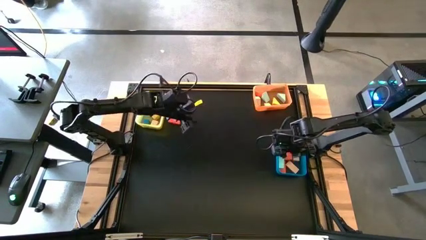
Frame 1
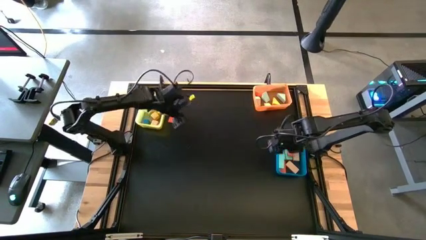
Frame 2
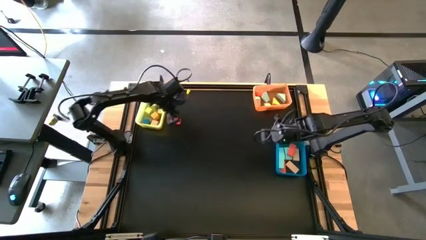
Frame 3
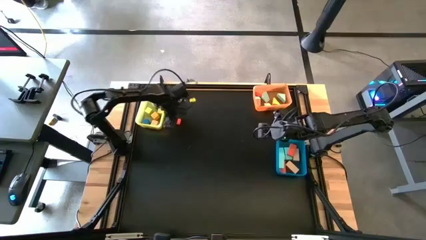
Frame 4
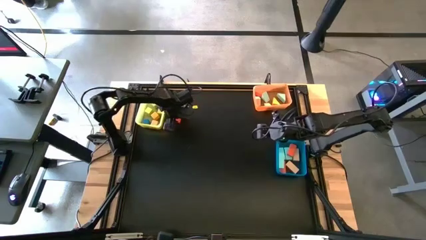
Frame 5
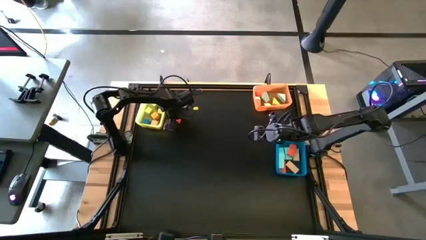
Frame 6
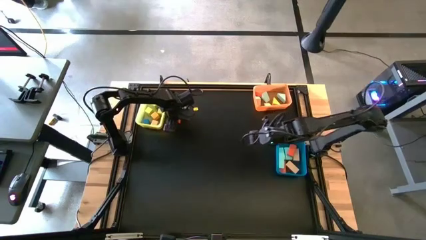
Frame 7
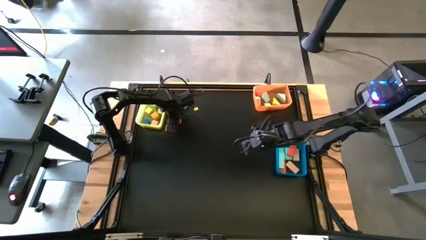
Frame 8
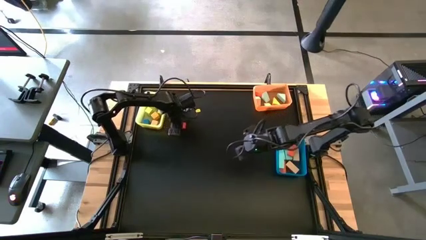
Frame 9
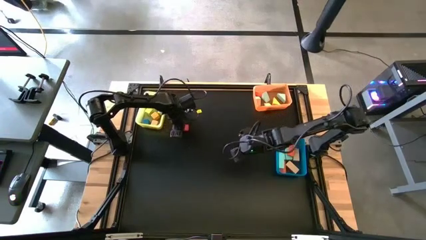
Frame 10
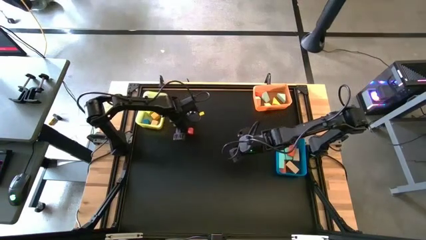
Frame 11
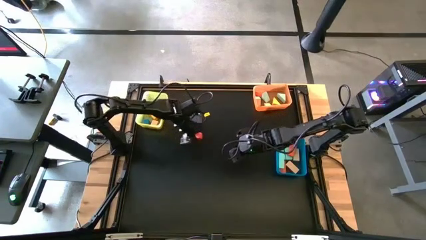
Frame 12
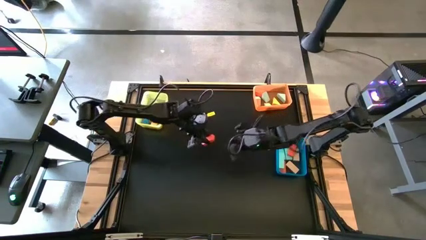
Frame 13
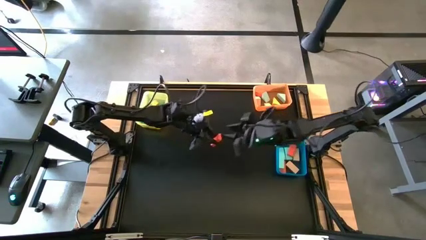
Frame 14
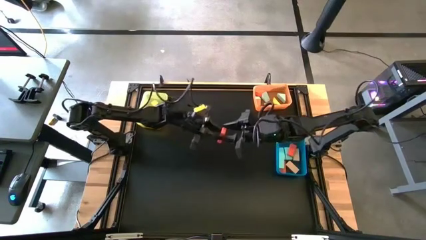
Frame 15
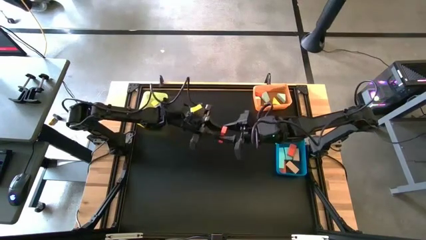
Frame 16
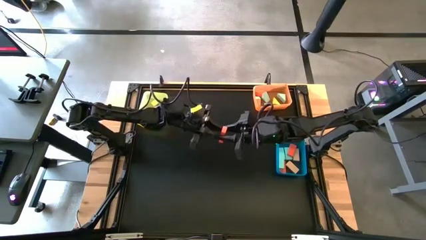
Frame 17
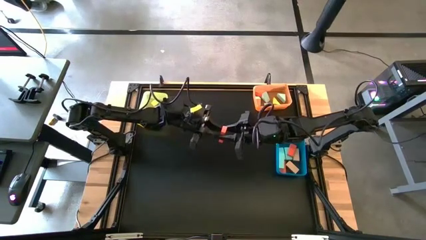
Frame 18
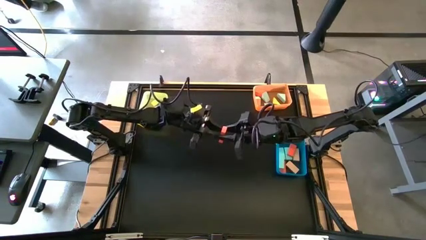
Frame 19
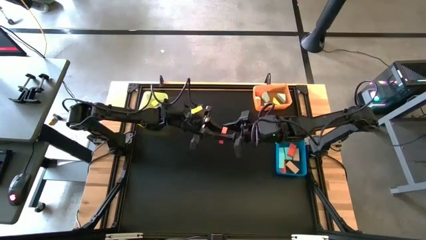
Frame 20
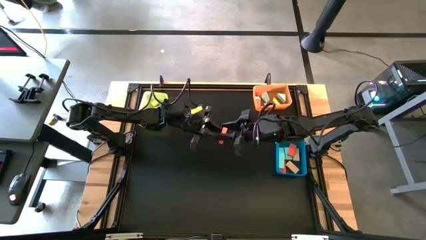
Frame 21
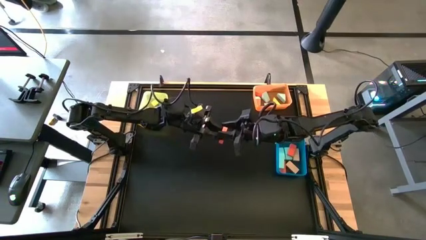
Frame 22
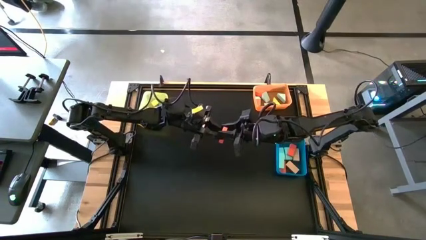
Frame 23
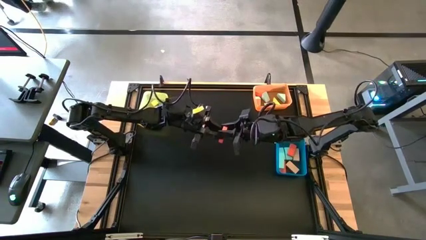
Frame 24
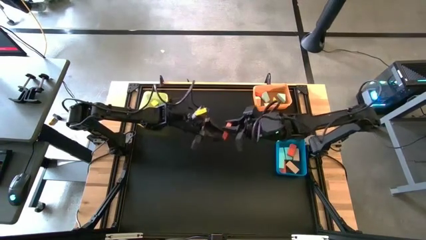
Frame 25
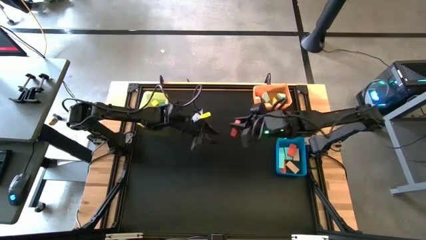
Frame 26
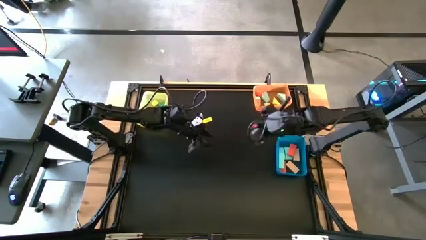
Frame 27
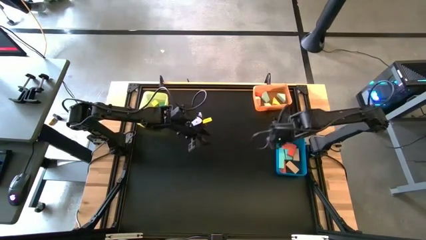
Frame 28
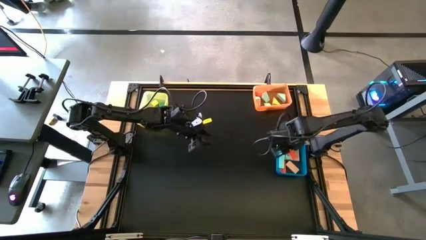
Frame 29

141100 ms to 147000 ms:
Task: Sort blocks by size
Put the orange rectangle block into the blue bin

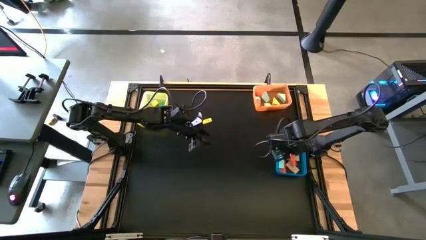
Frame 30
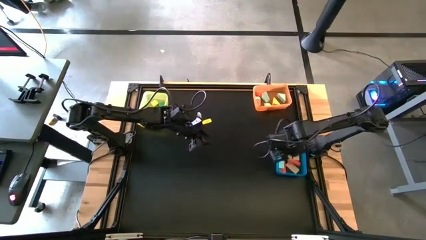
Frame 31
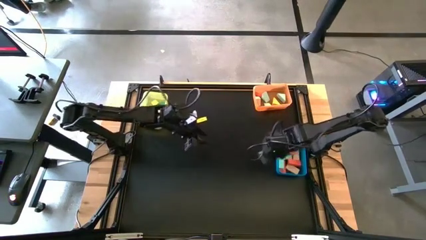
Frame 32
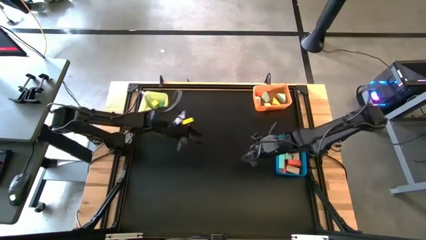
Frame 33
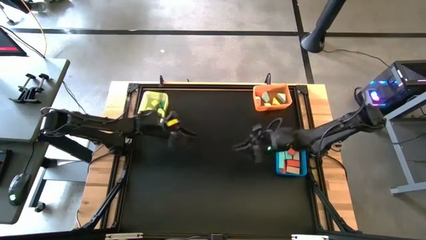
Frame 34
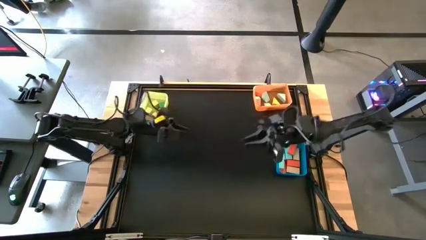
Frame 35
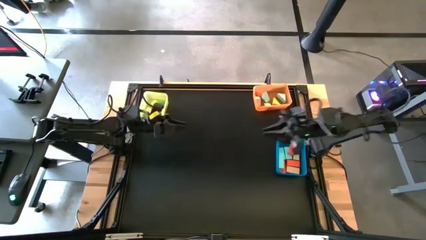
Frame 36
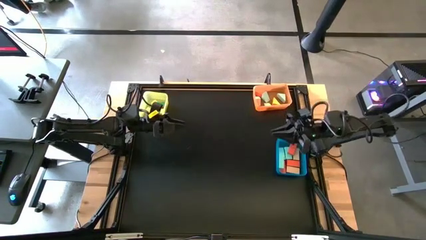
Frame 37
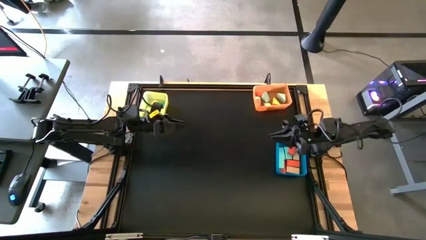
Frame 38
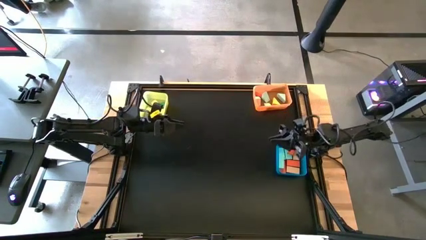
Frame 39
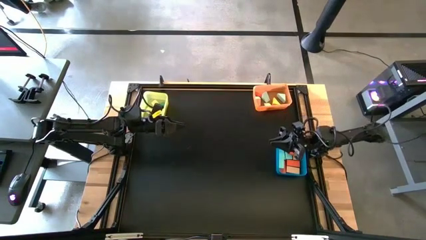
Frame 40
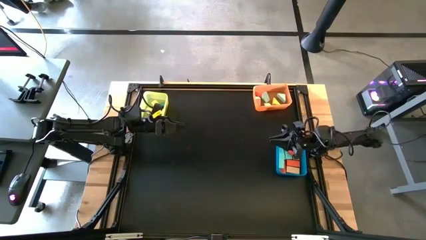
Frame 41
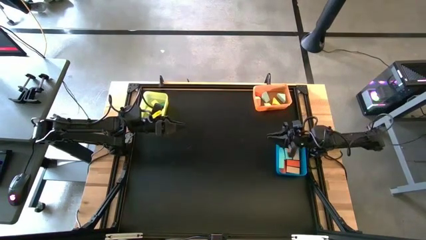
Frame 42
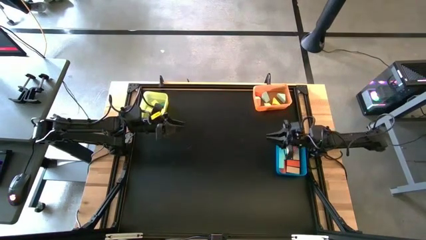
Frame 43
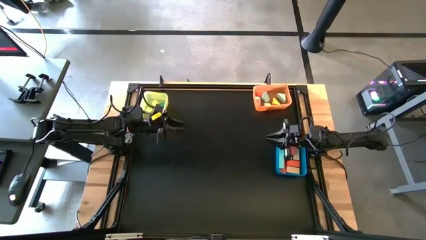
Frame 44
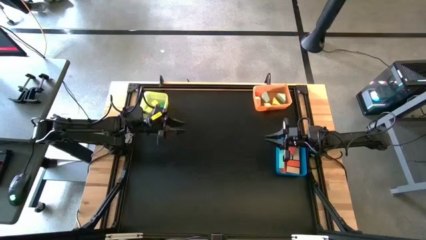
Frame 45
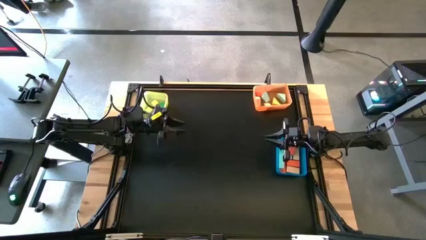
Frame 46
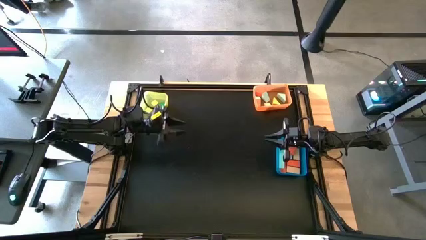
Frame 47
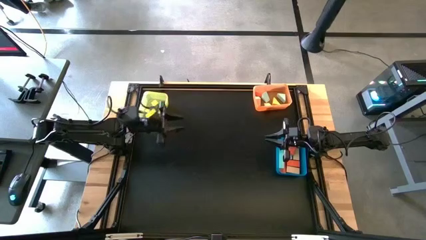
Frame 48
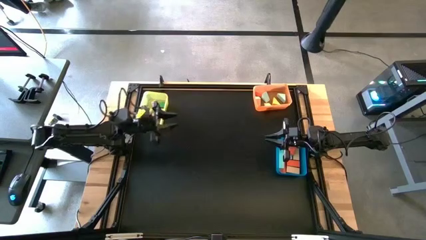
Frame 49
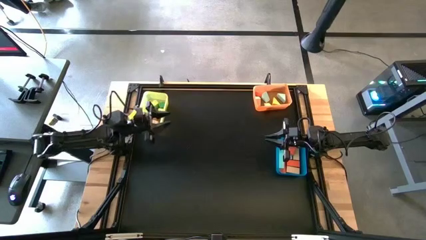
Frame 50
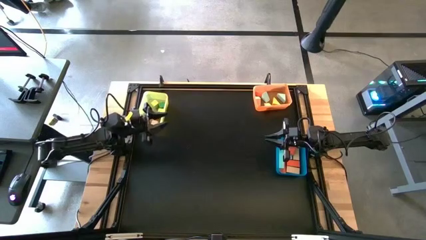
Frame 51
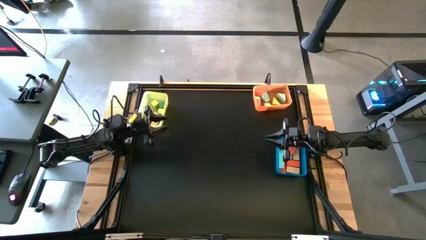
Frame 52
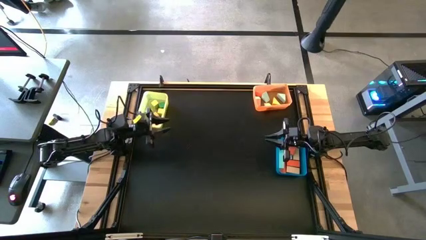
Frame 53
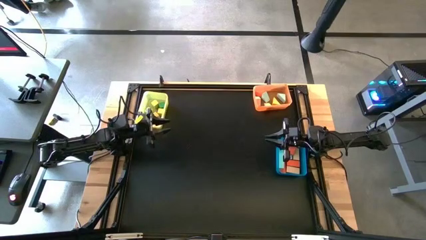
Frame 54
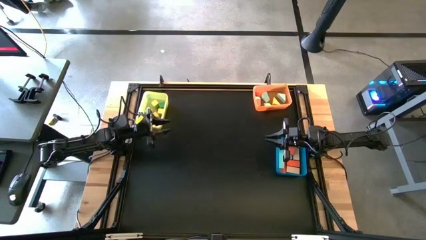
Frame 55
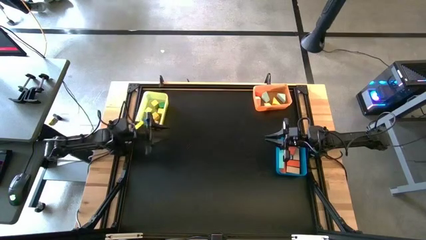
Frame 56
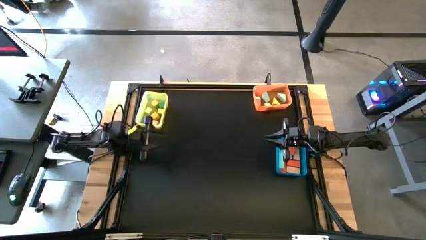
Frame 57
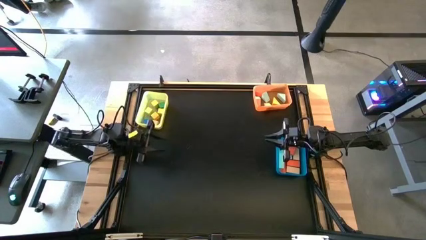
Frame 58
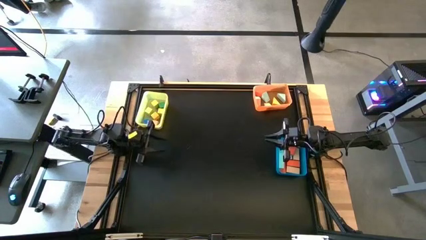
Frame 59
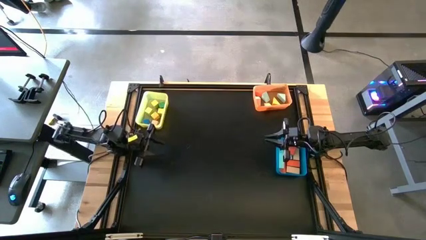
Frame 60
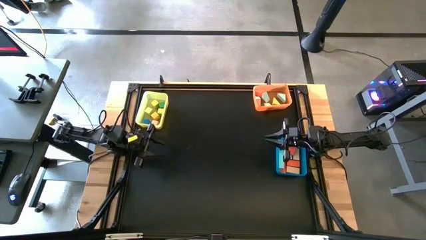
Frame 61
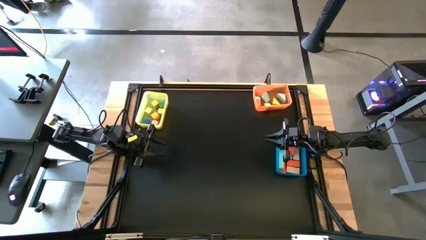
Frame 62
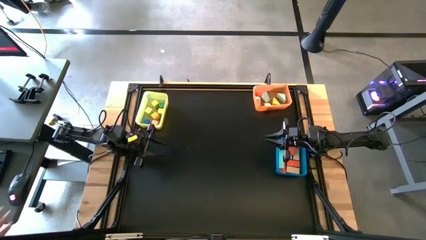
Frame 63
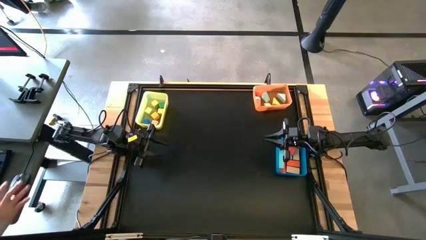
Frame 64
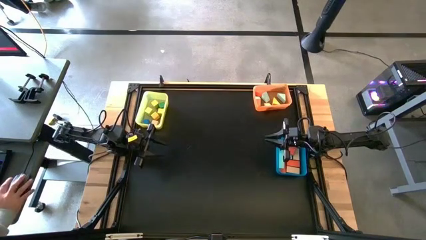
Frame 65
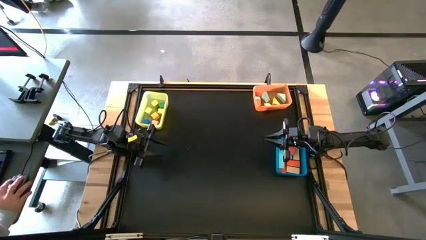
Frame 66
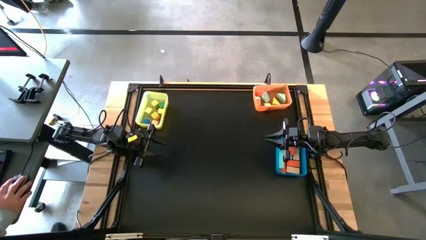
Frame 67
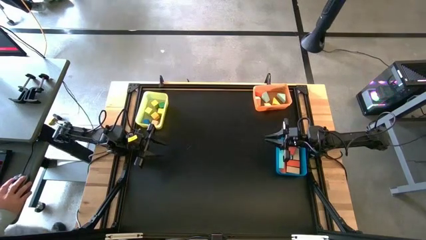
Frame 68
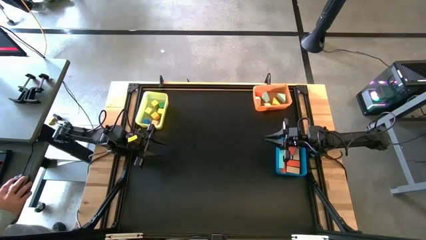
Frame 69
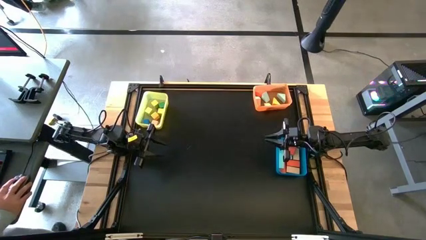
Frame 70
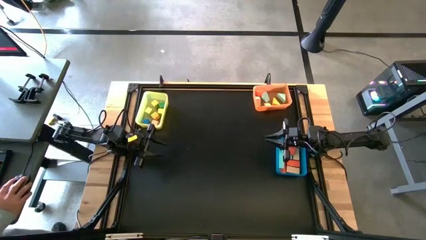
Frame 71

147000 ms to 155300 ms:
Return to Home Position

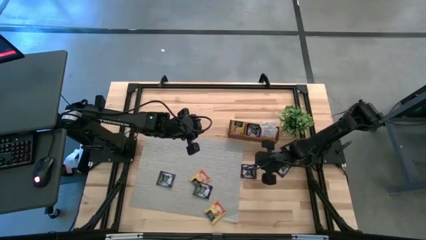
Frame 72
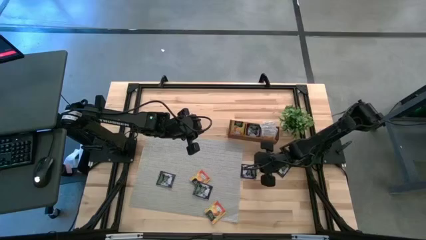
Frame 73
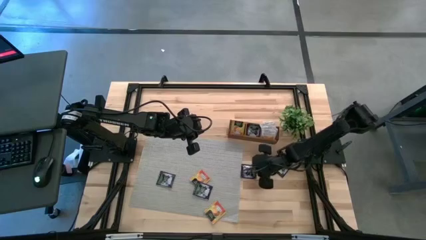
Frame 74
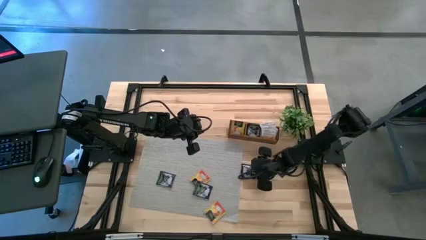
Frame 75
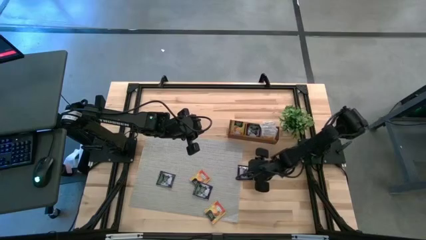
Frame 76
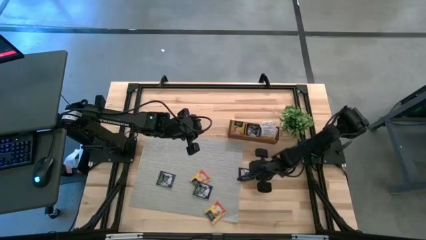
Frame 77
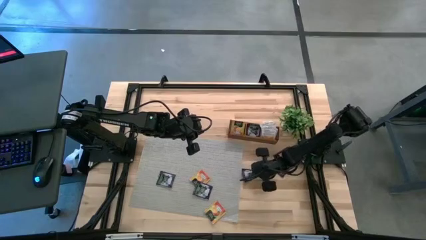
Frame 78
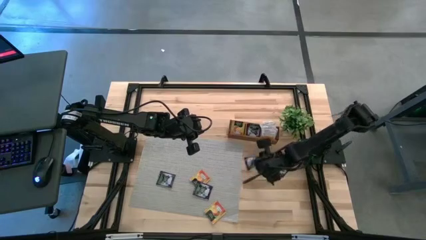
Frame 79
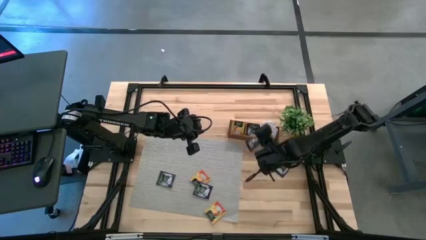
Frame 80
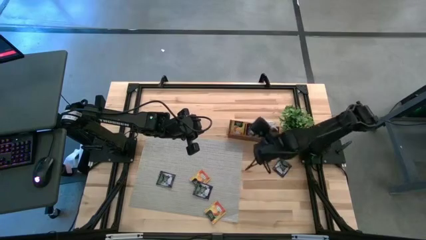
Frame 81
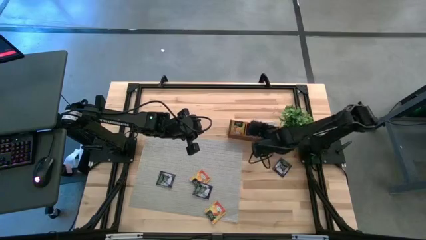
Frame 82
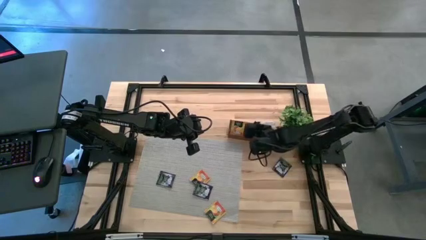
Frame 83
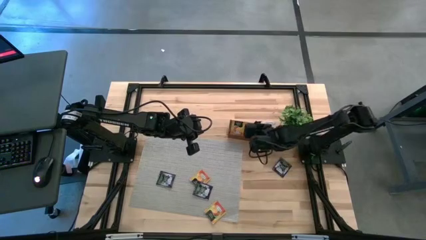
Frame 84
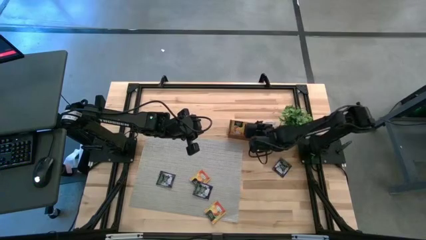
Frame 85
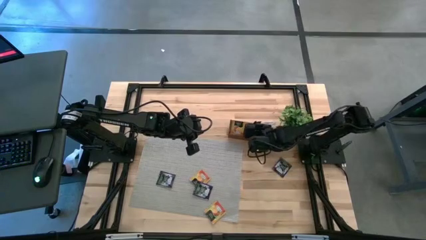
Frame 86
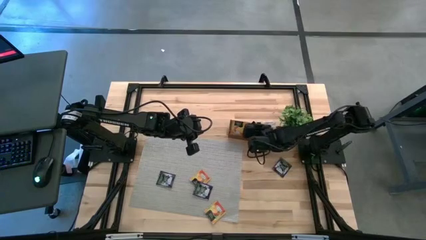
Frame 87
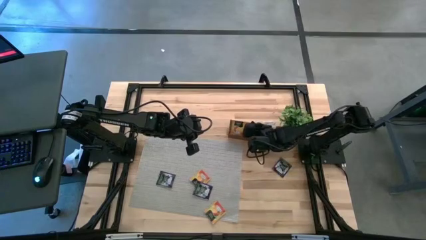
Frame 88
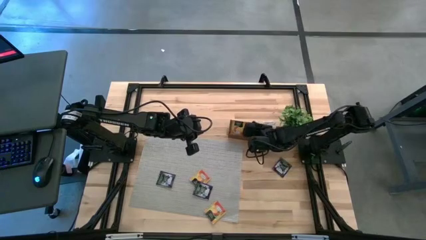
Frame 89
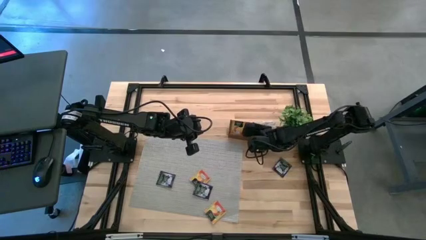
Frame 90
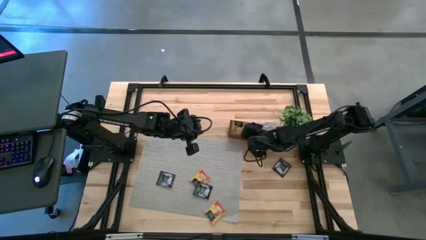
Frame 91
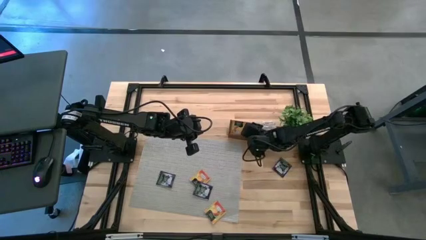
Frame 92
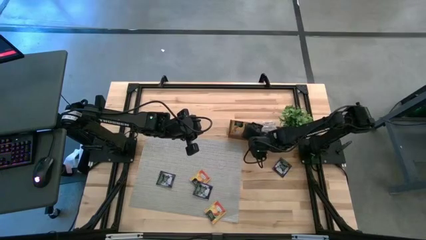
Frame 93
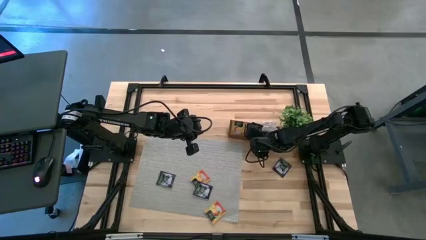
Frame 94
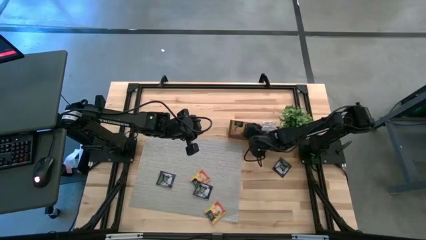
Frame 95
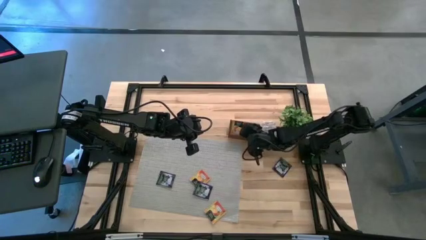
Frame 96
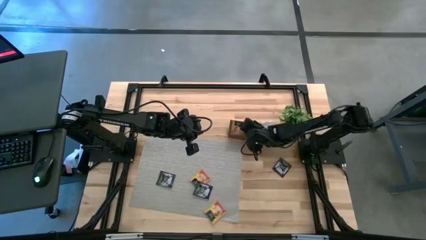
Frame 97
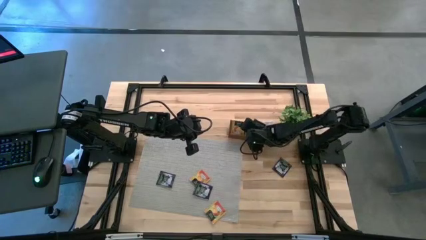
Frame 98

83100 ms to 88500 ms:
Task: Pick & Place Tea
Put the dark purple tea bag in the middle section of the wooden organizer
